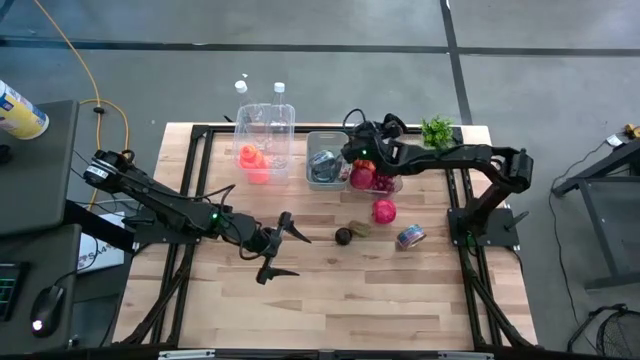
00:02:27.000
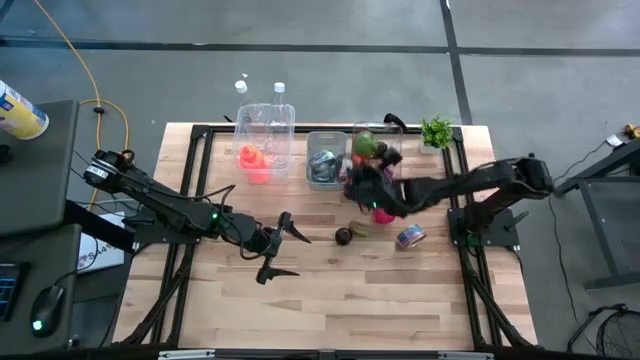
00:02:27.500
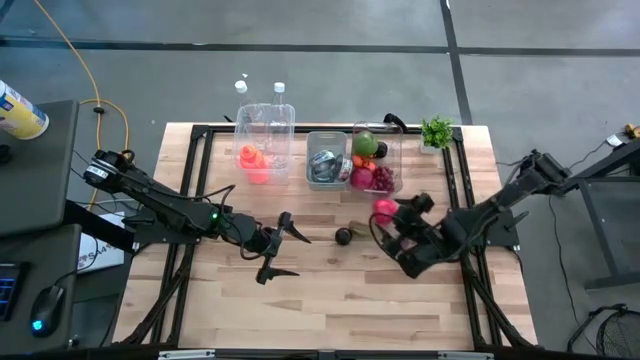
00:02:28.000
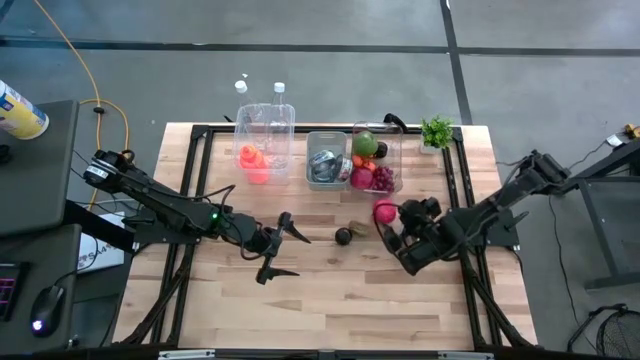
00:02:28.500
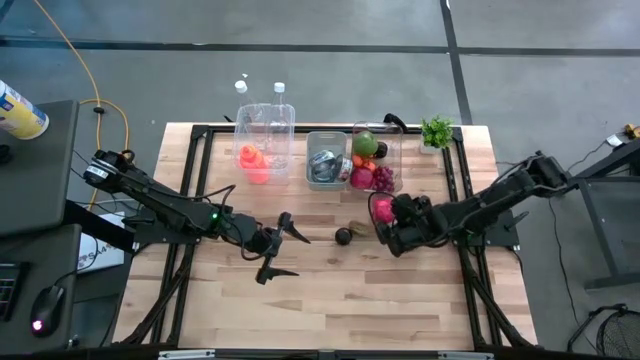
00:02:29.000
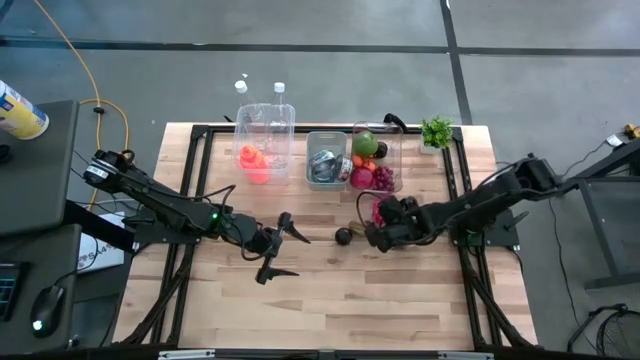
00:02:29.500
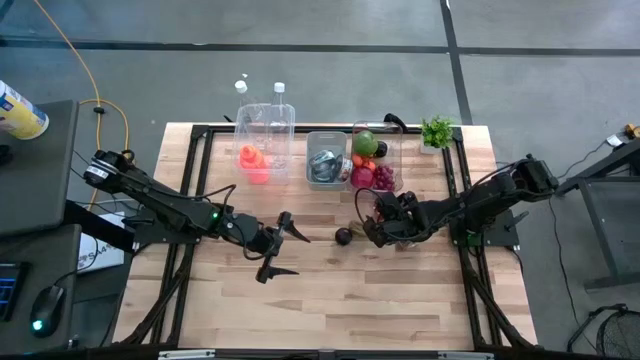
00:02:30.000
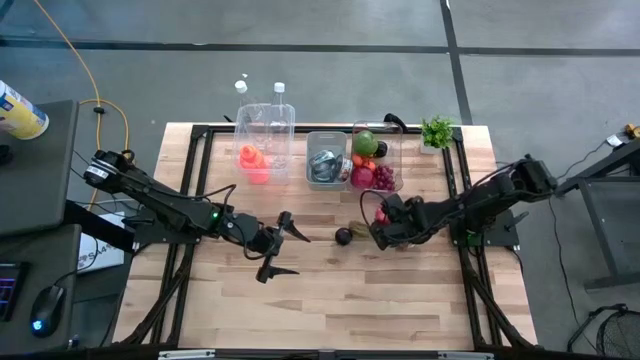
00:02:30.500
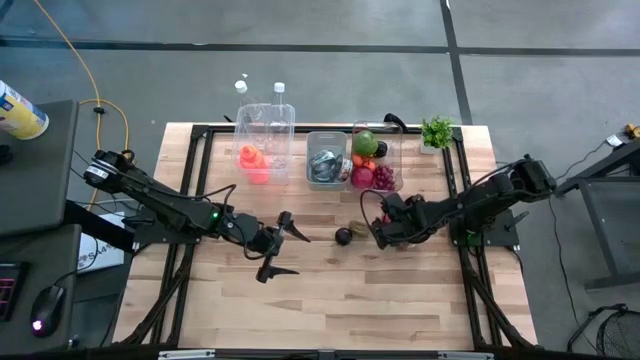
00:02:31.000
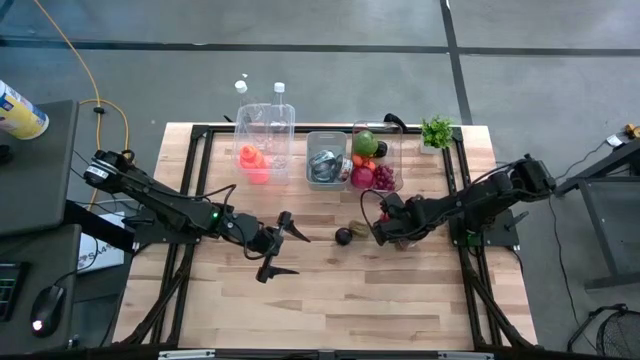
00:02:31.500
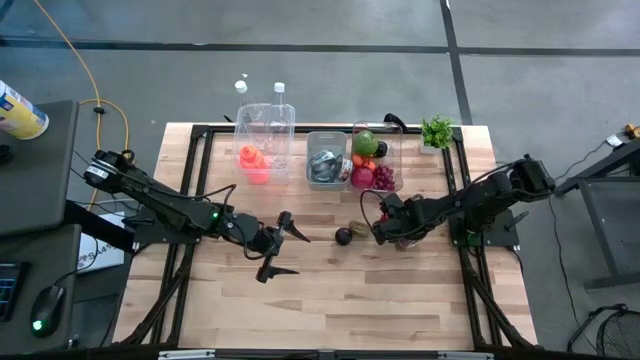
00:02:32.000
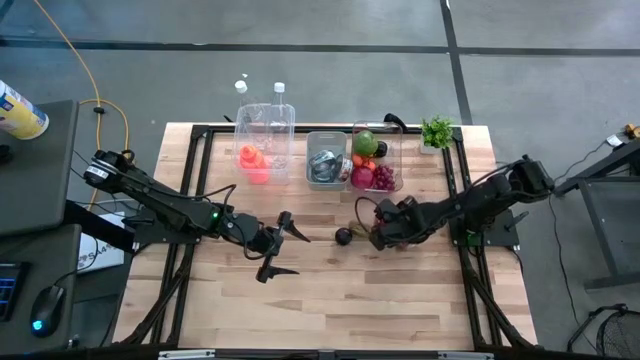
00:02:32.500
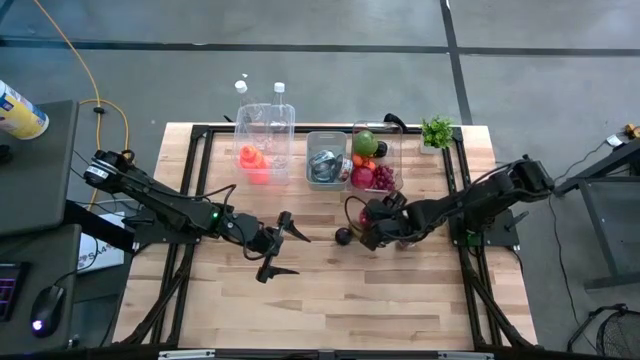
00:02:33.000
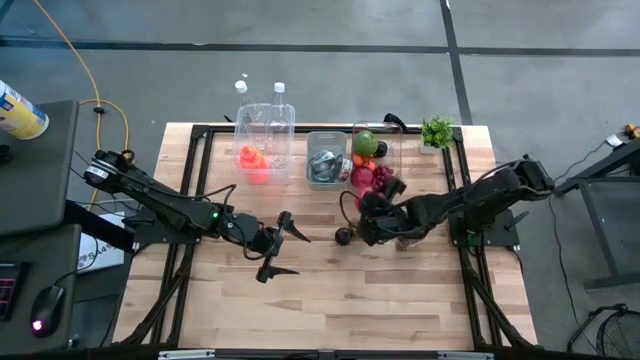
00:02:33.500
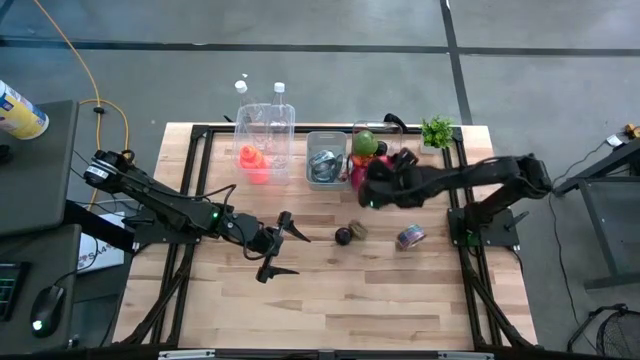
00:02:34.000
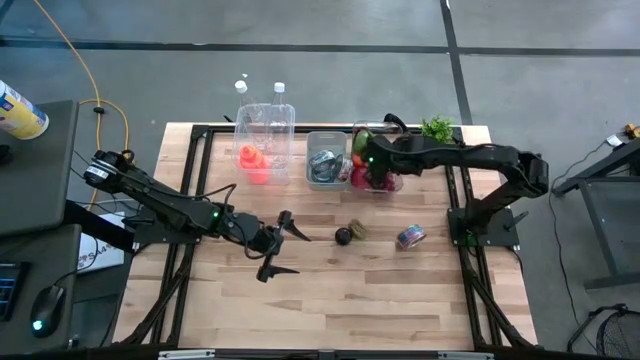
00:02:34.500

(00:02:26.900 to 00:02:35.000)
Task: Pick & Place Food Item
Put the red apple into the transparent bin

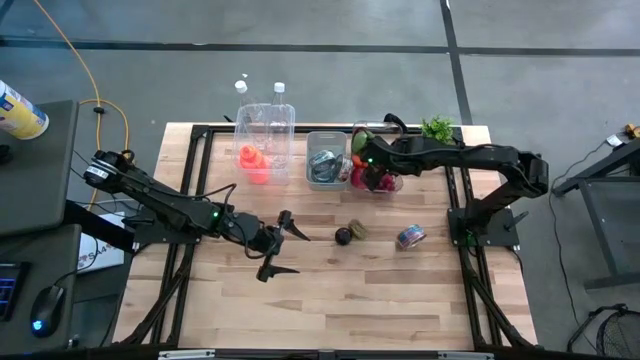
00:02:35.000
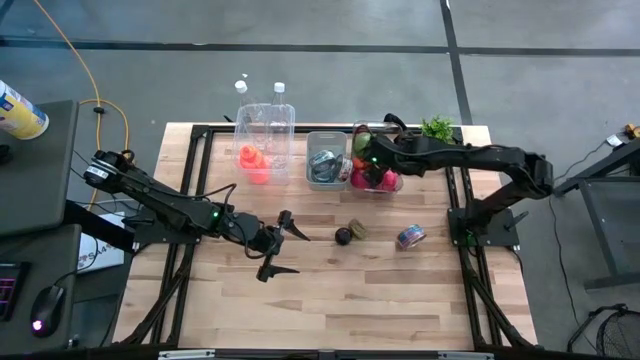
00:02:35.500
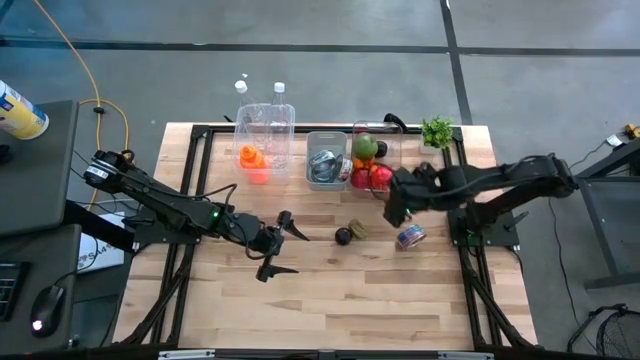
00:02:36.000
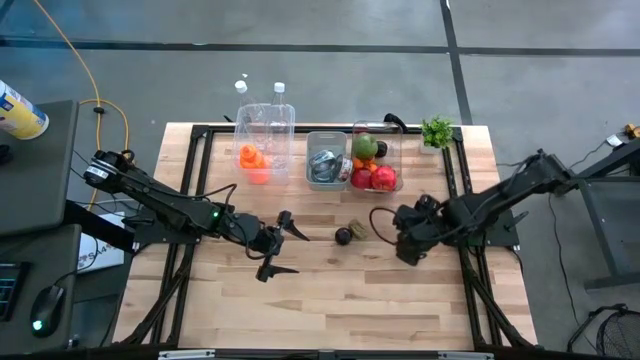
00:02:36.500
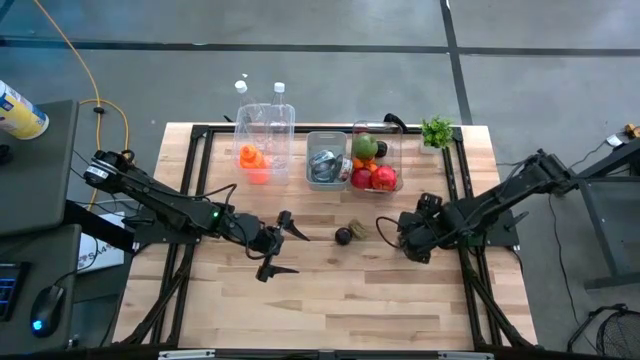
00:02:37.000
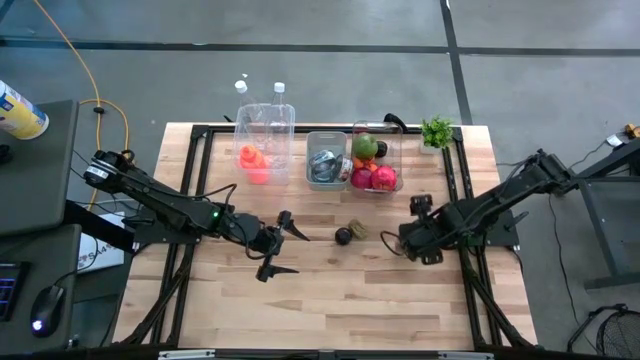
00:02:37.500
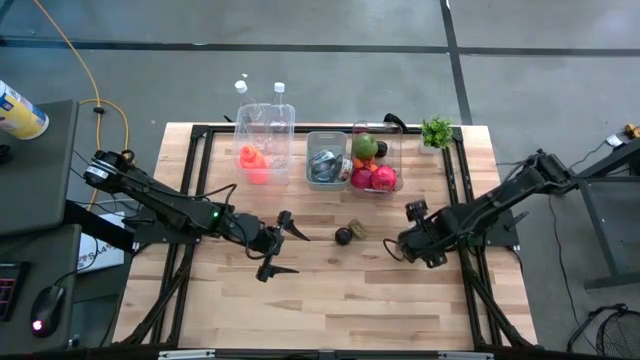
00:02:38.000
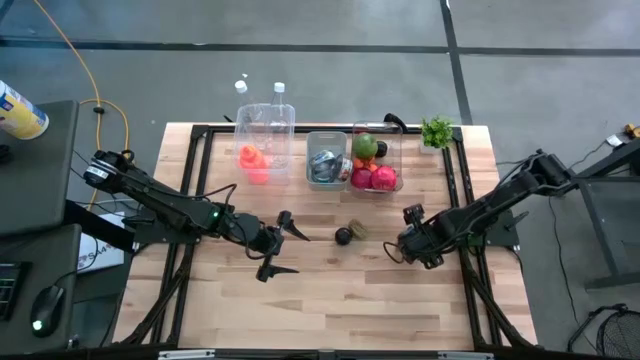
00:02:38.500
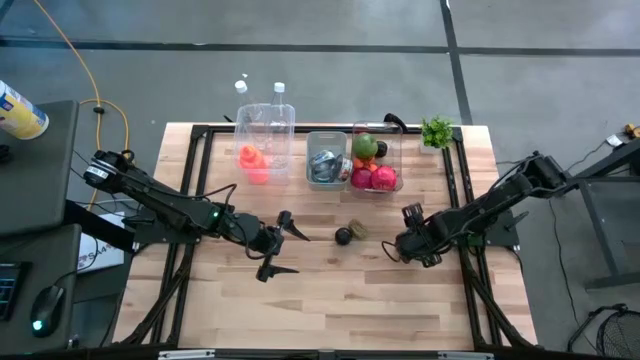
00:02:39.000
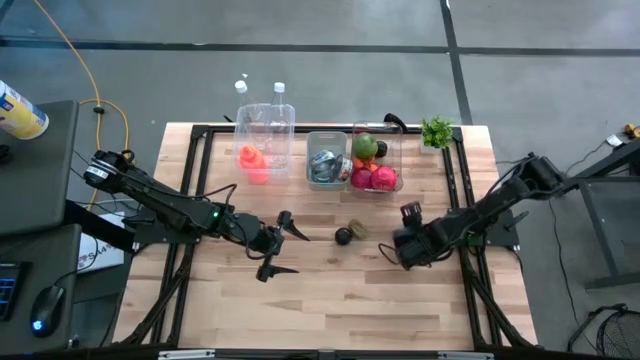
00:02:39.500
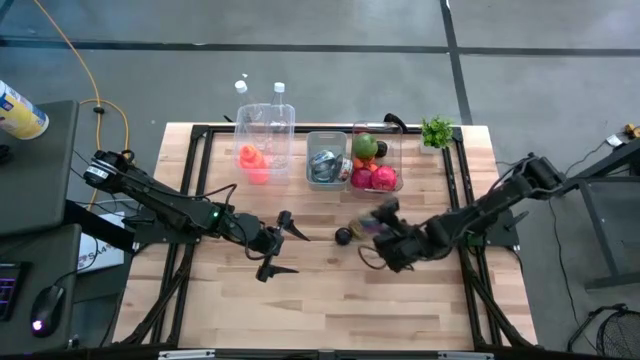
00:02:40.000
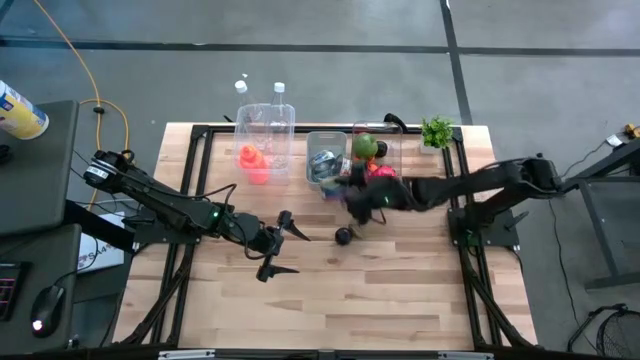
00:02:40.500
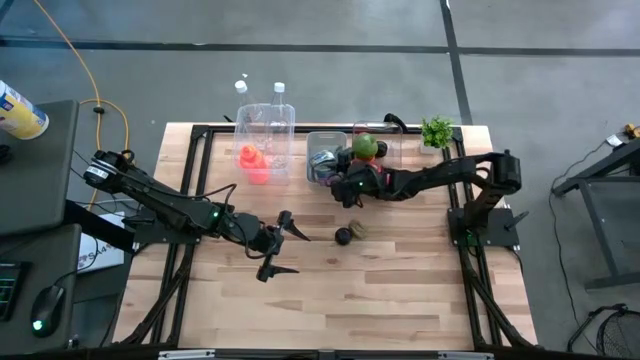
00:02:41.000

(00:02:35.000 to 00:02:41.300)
Put the blue pink tuna can into the grey bin

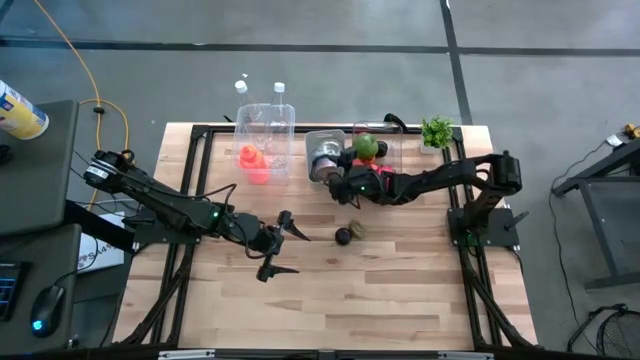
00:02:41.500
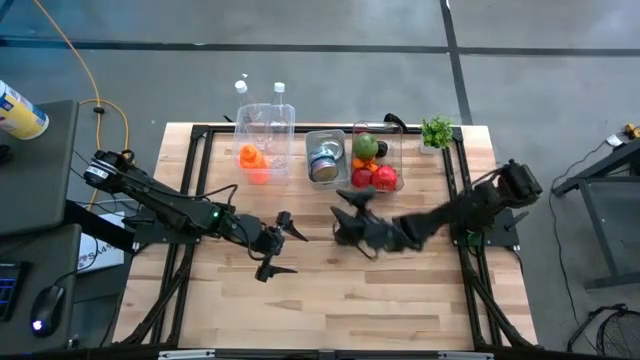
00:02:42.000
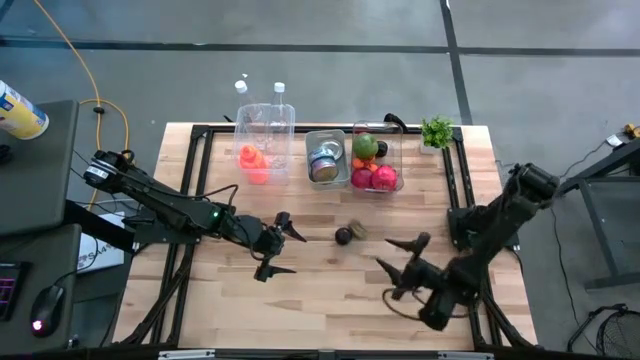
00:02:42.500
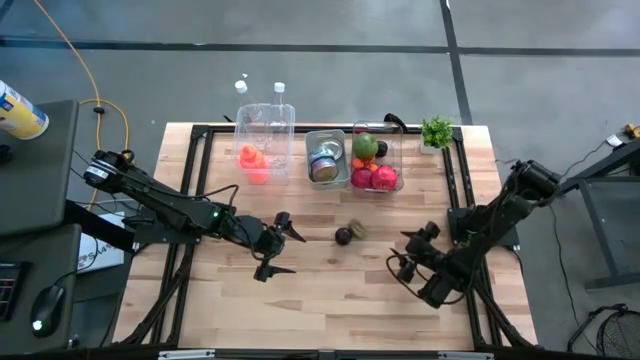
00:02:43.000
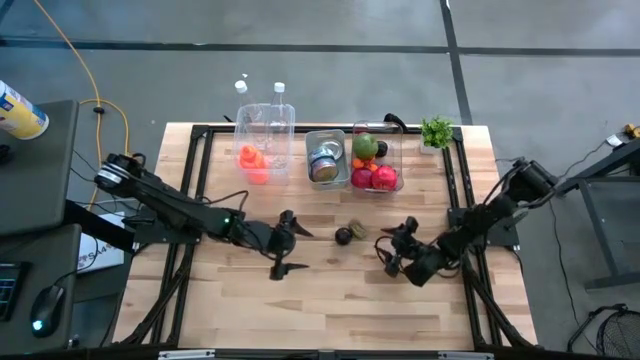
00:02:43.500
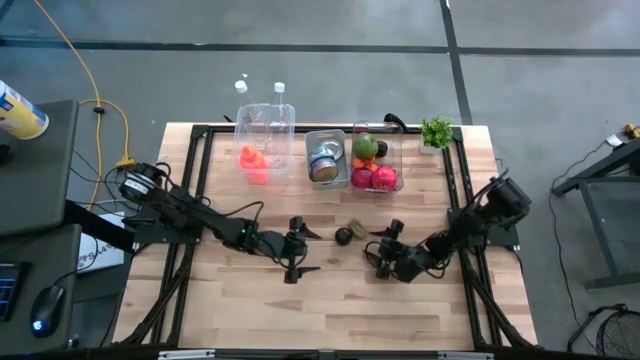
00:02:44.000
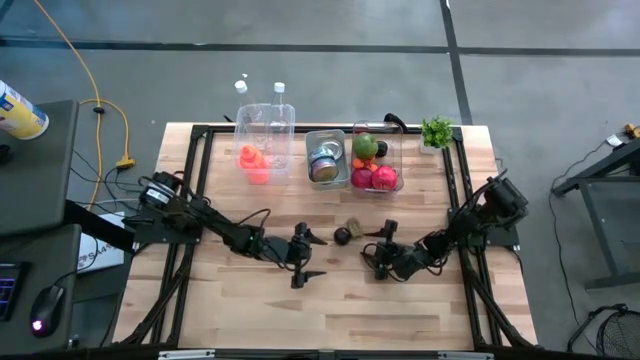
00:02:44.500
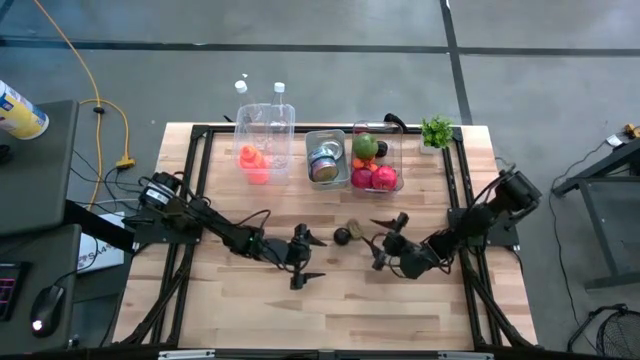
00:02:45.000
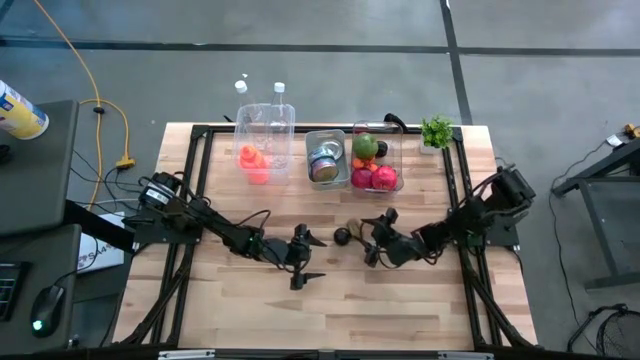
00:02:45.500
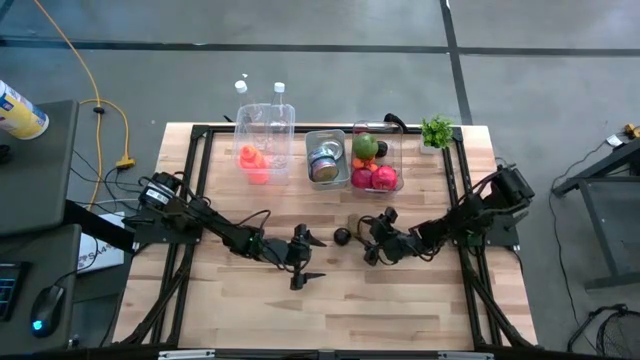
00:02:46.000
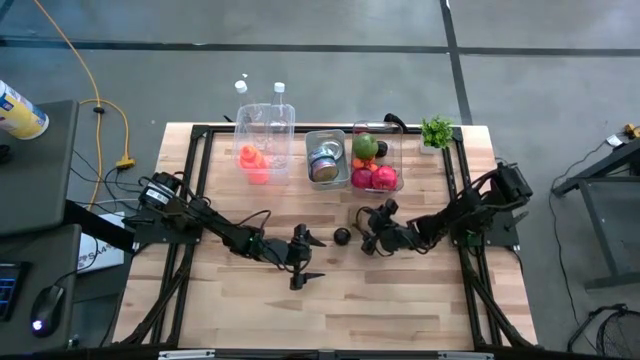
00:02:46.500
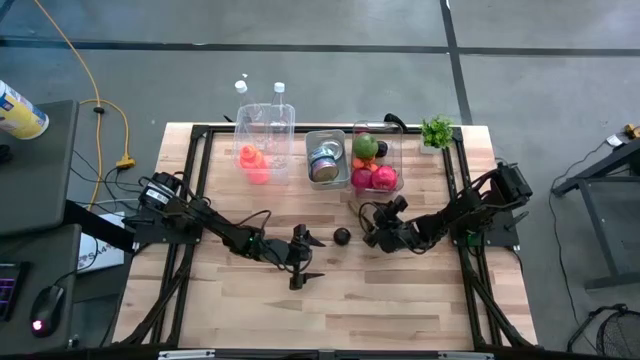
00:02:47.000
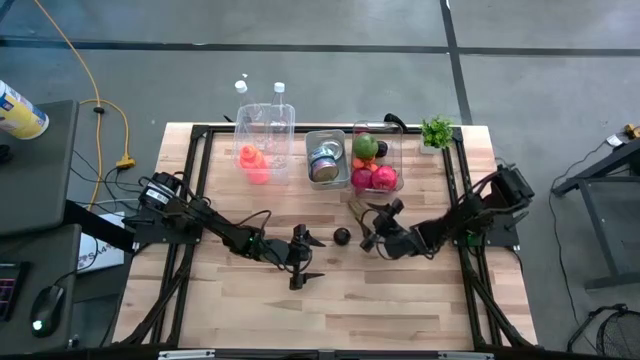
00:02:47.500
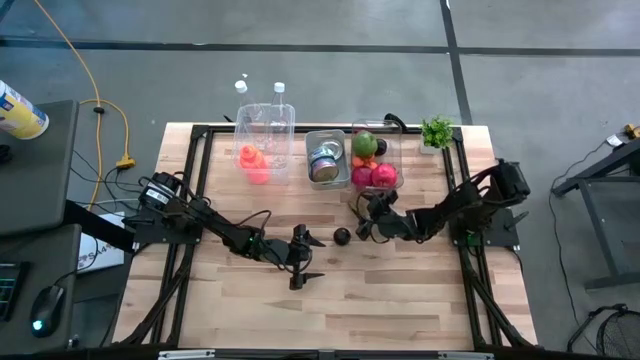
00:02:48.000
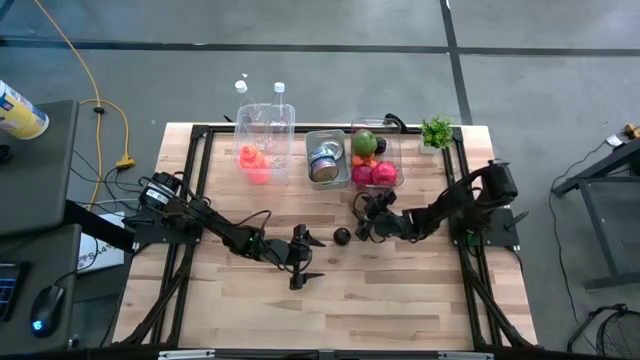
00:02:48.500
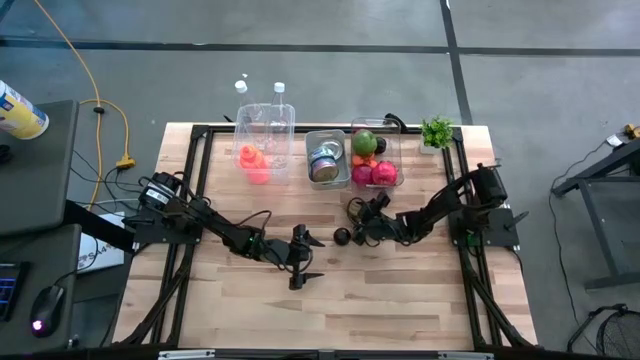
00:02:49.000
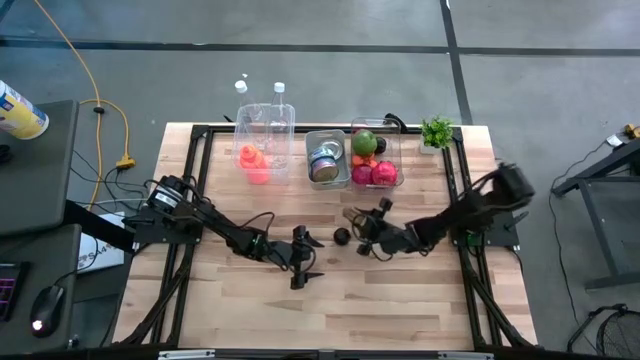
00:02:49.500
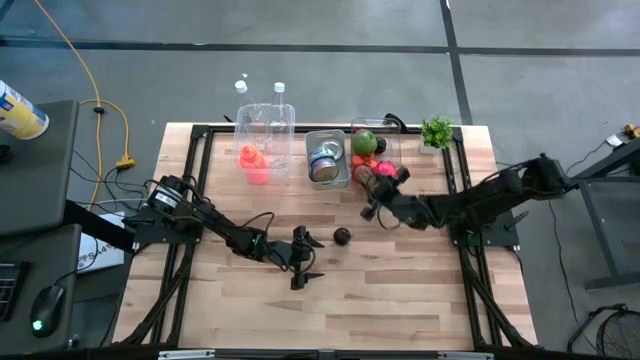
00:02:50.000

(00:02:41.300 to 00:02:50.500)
Put the kiwi into the transparent bin
